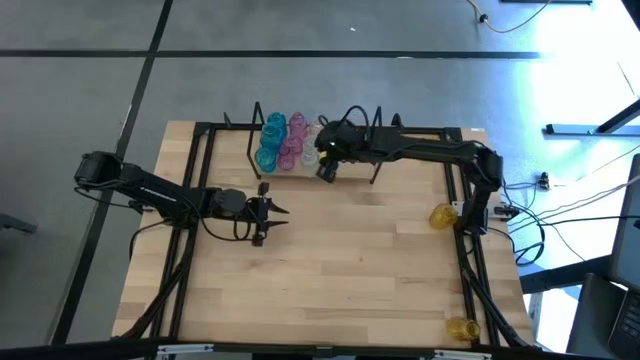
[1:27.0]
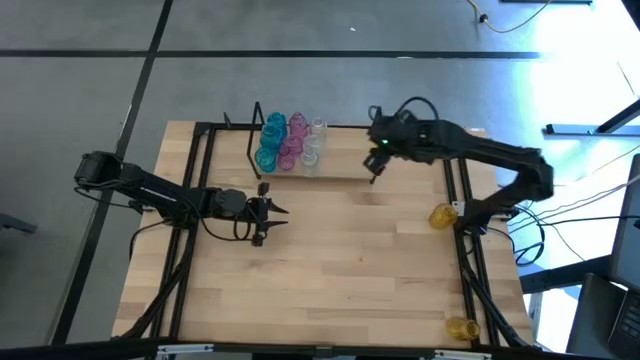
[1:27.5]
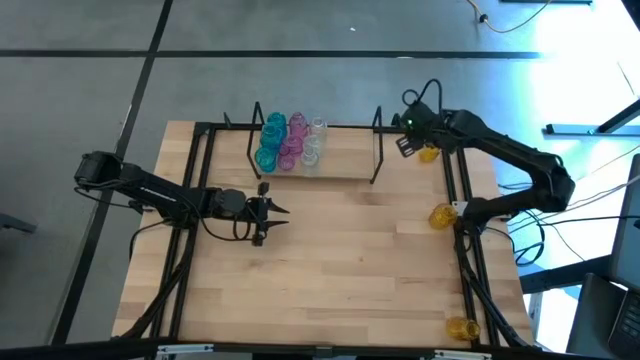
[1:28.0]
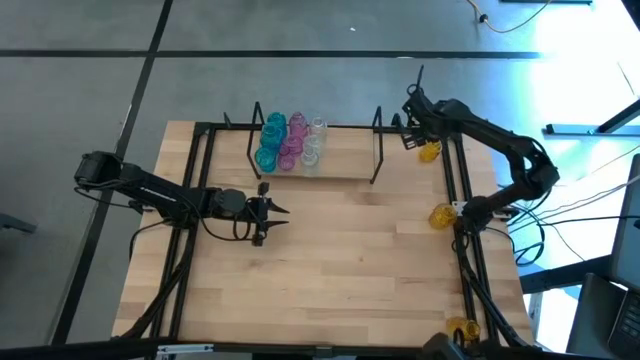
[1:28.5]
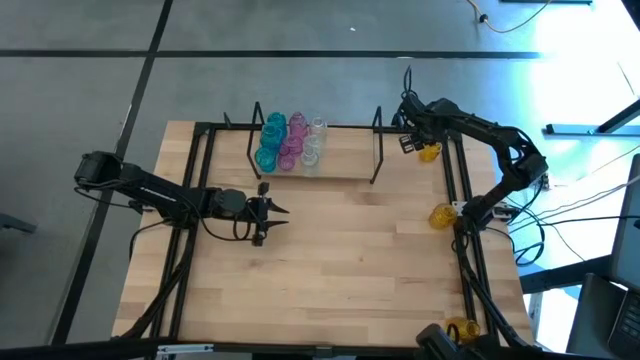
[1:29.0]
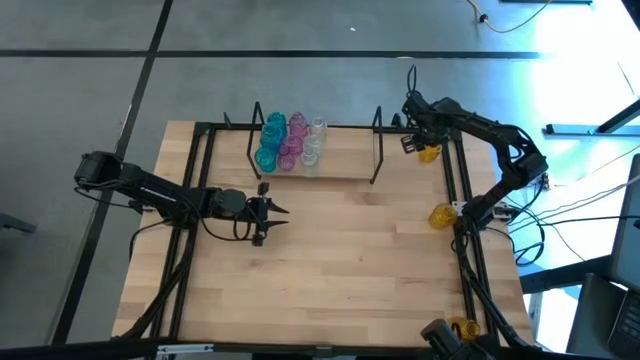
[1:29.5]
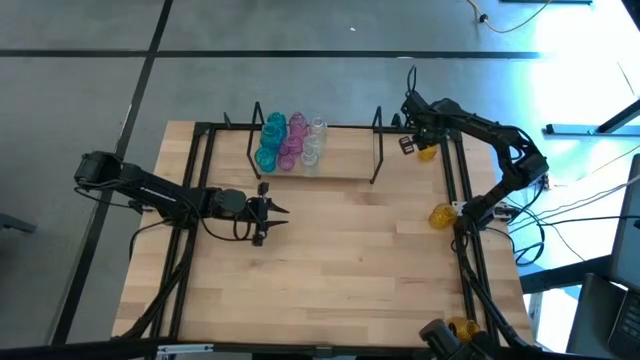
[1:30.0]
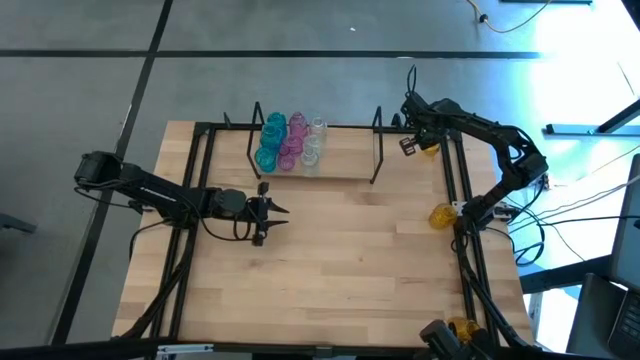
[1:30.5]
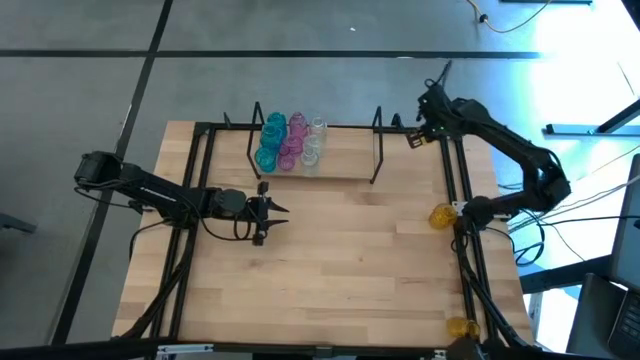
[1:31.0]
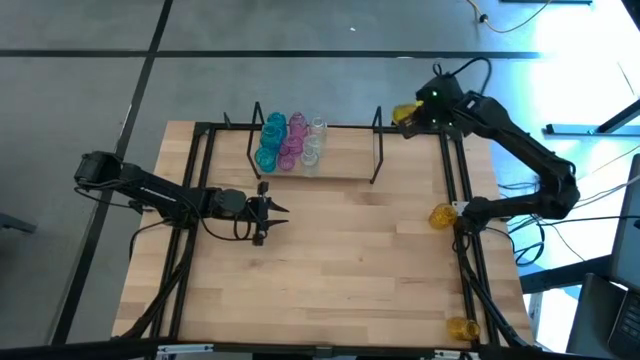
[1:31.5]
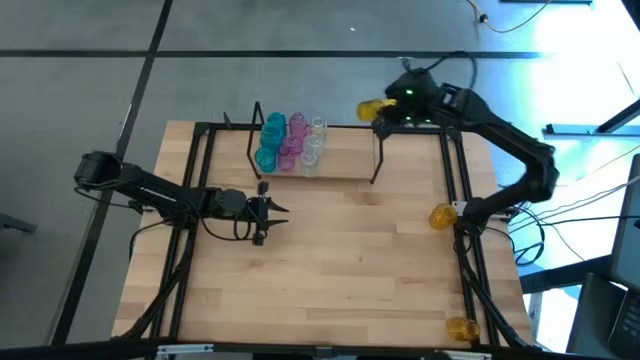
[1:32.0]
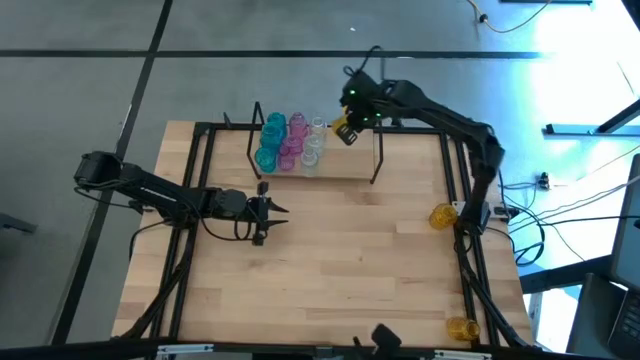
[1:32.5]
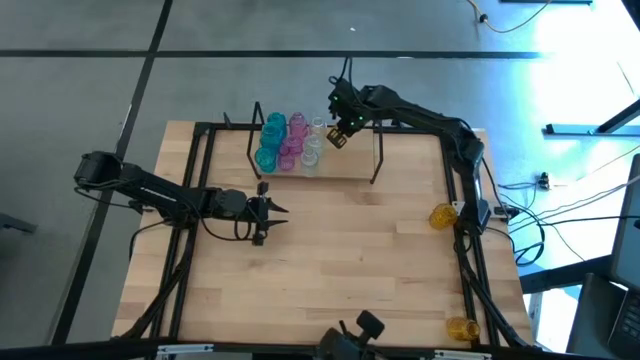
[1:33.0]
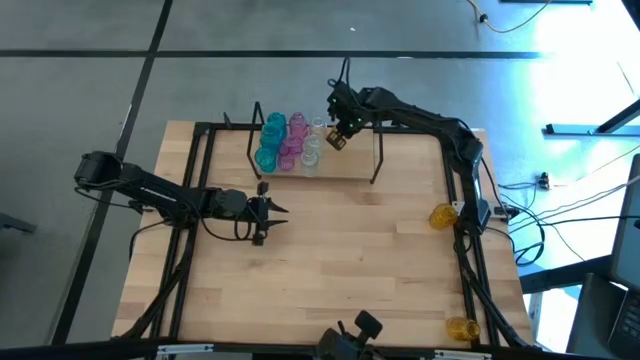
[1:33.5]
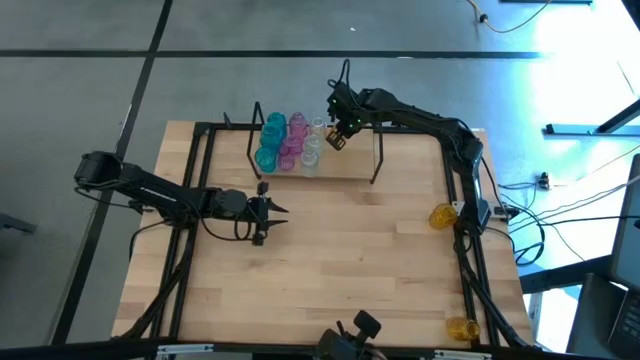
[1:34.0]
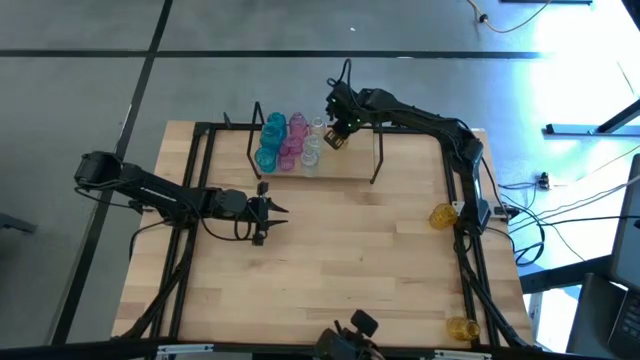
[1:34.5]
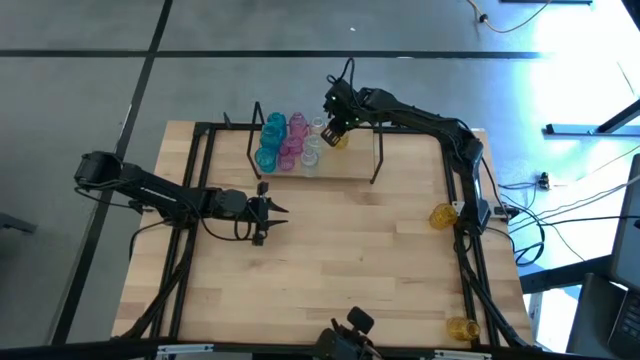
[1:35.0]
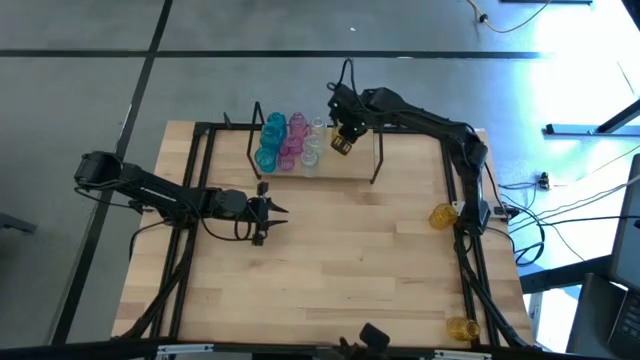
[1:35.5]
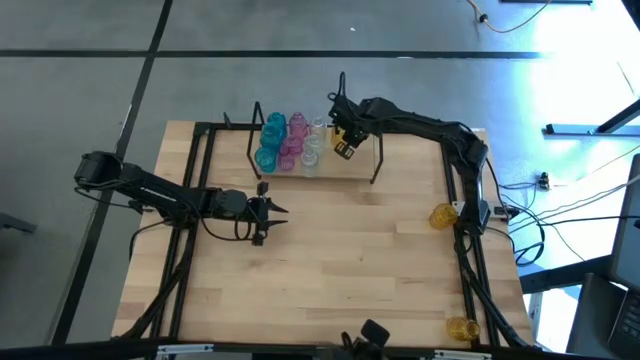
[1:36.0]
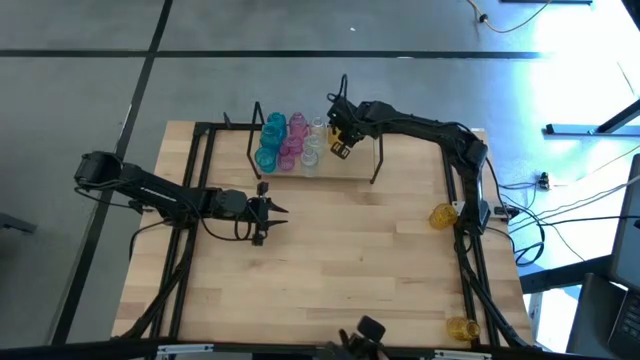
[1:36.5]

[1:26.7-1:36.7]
Task: sort vases onto shelf
Put the top yellow vase on the shelf

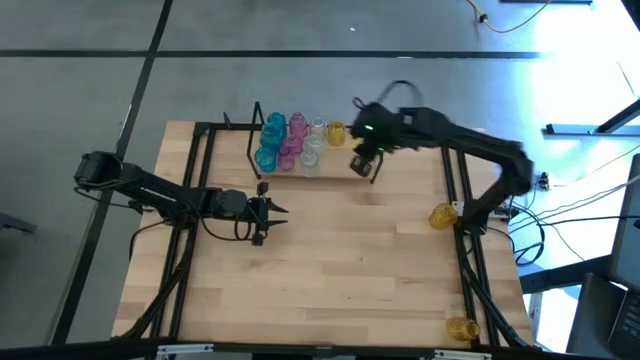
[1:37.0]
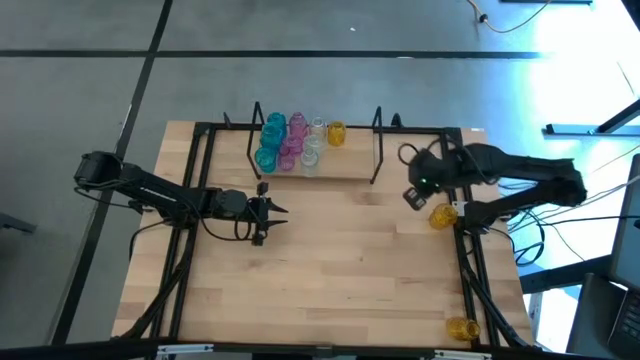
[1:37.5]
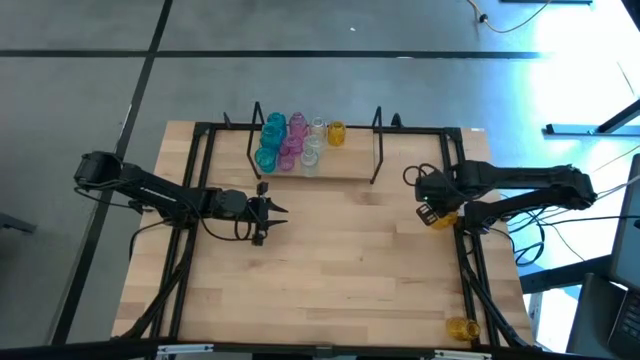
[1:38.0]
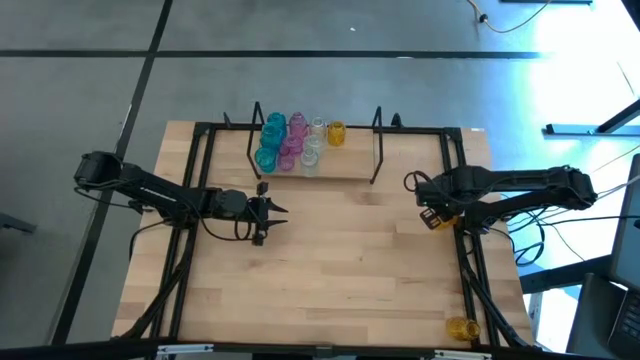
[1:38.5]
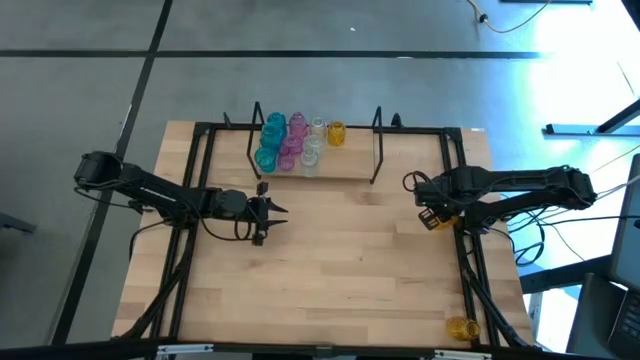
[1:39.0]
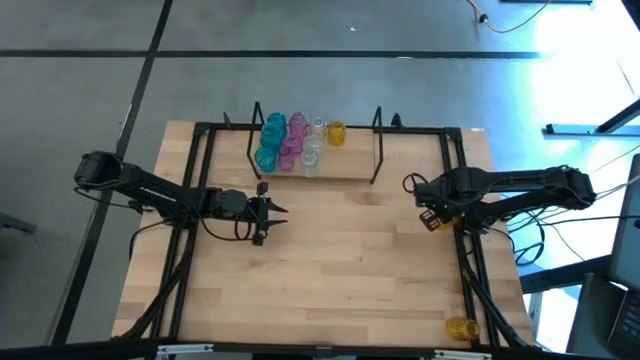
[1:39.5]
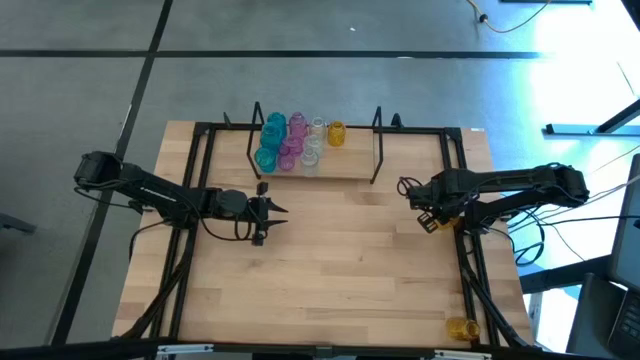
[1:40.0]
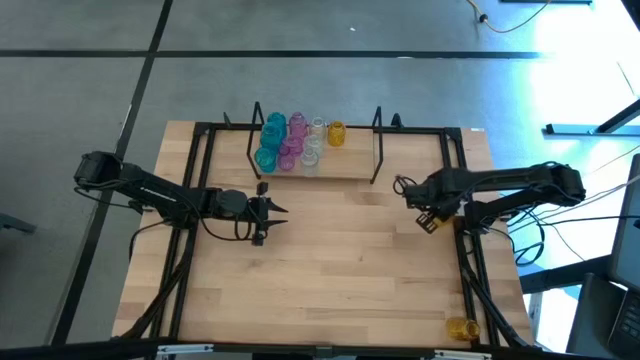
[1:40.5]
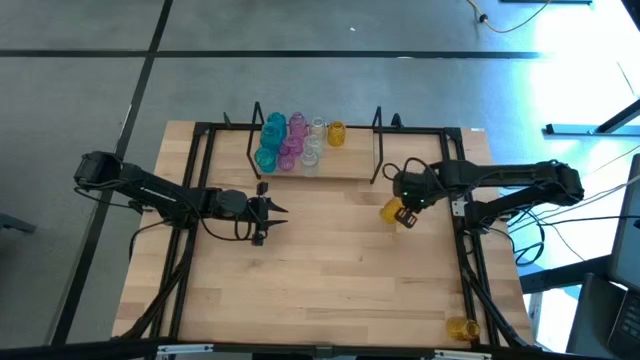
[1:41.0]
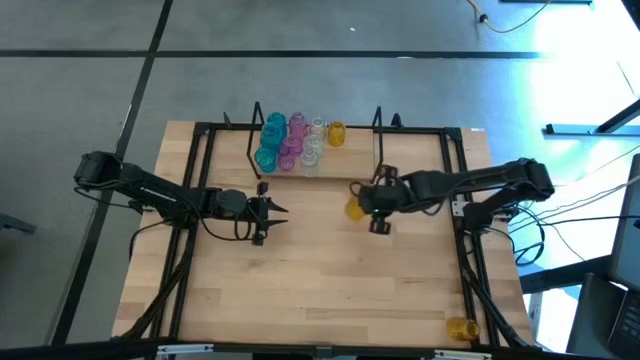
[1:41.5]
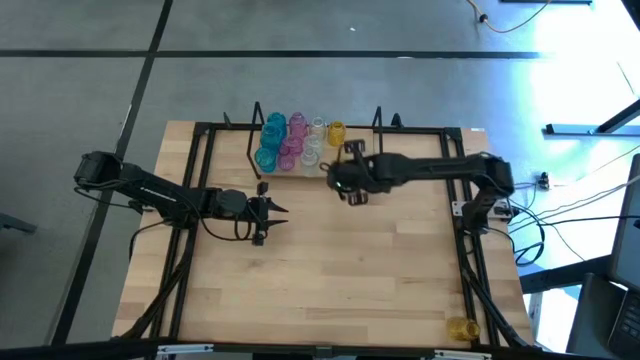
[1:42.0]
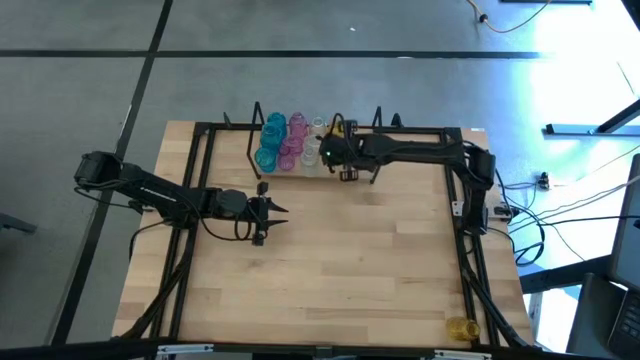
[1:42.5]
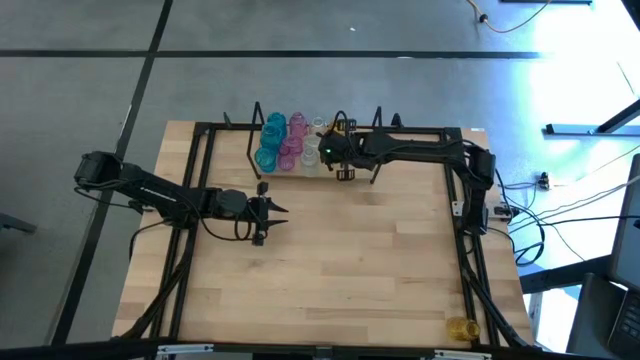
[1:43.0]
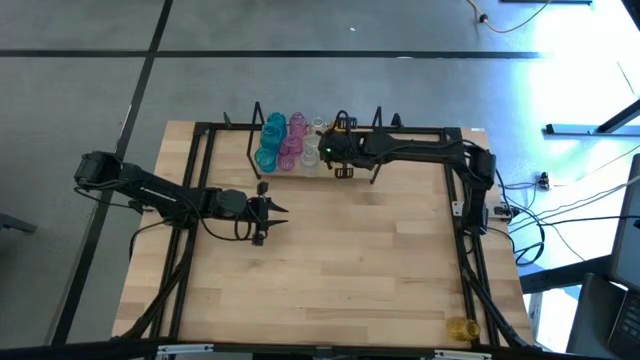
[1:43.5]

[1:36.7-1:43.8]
Put the top yellow vase on the shelf aligned with the other yellow vase

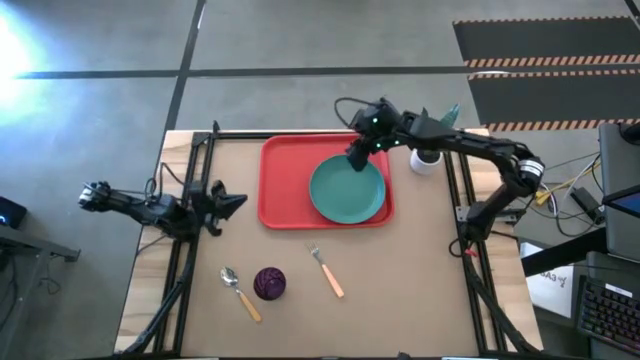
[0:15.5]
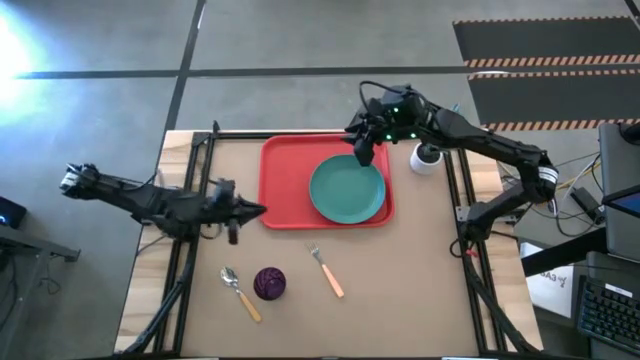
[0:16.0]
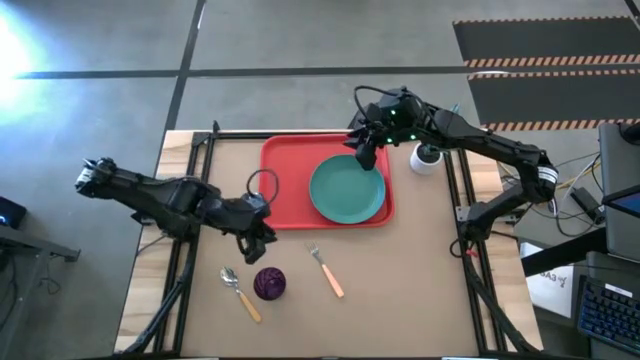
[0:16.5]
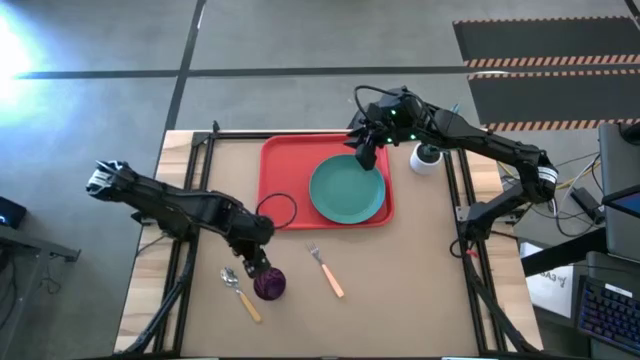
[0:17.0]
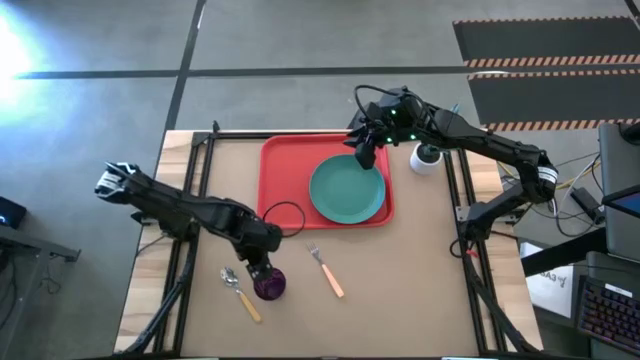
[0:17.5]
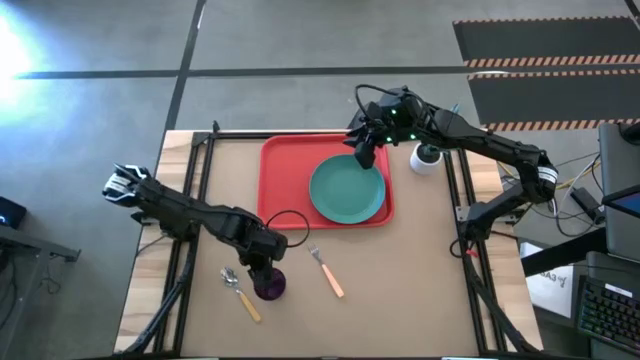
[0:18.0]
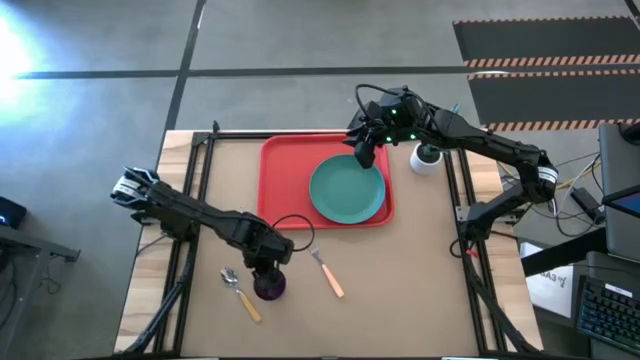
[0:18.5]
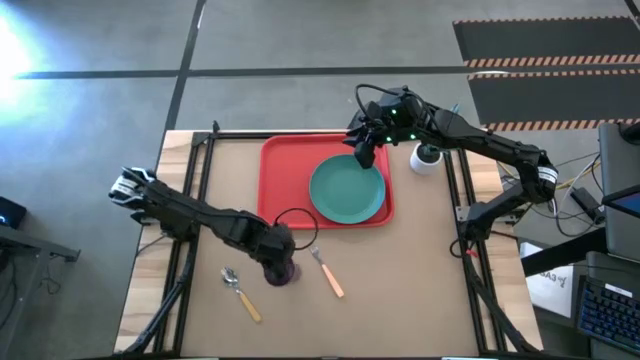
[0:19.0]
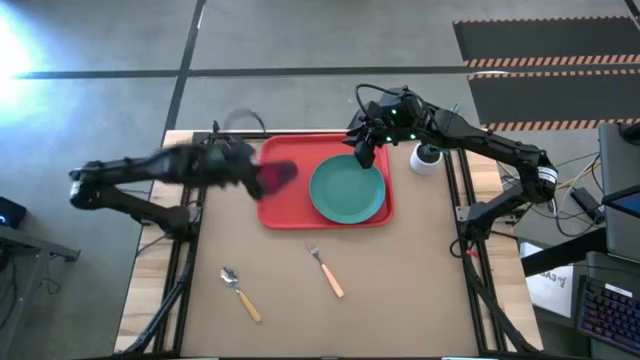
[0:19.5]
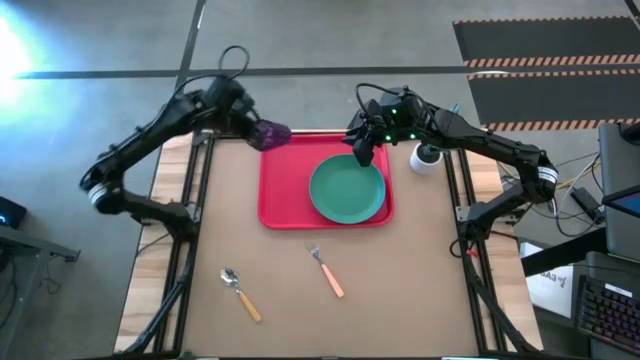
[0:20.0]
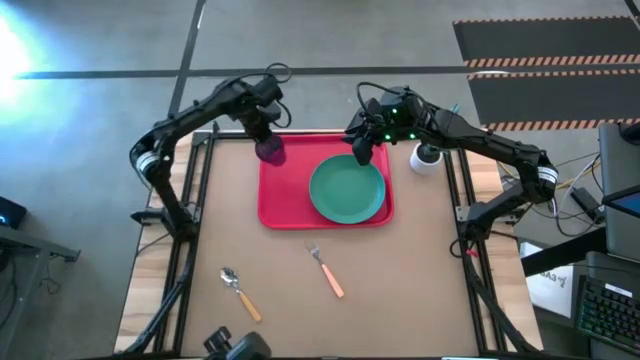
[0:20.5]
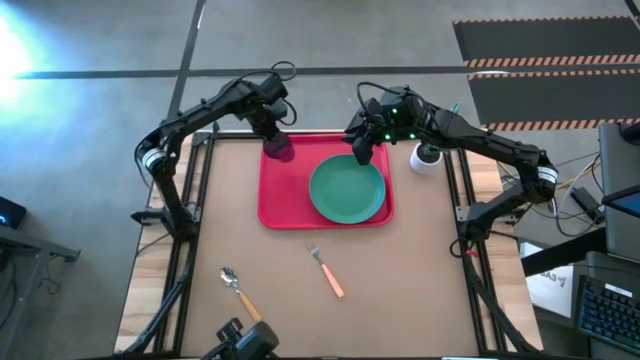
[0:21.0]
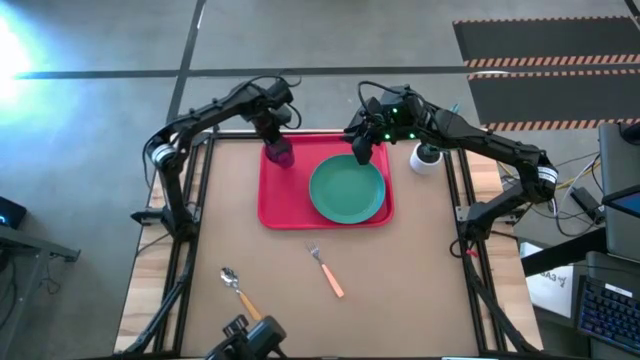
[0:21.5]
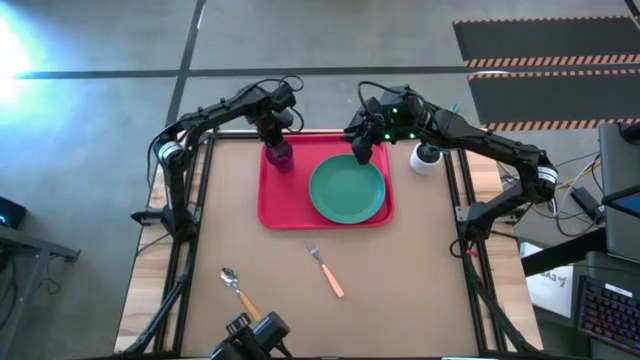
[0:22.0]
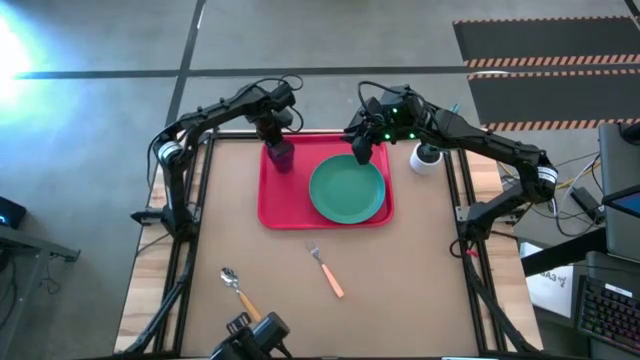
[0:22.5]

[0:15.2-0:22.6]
Task: Pick and place plate/cup/fork/spoon on tray
Put the violet cup on the top left of the orange tray
